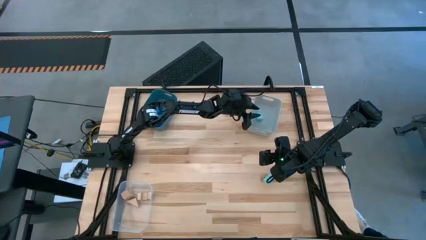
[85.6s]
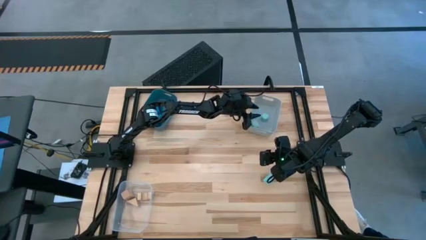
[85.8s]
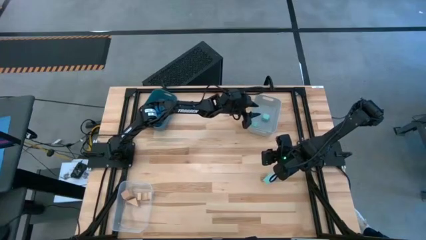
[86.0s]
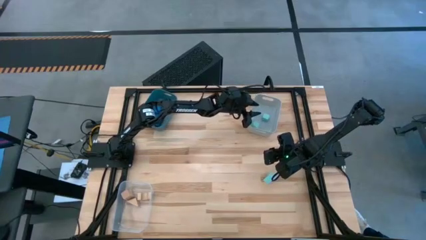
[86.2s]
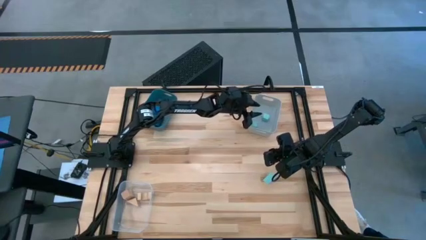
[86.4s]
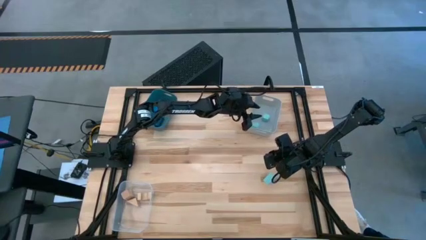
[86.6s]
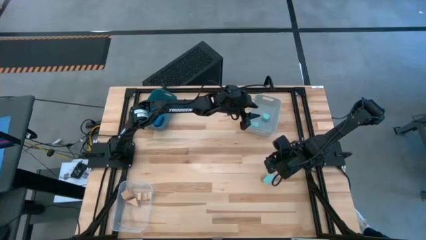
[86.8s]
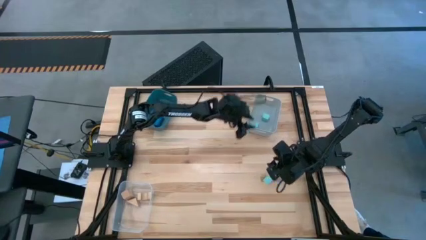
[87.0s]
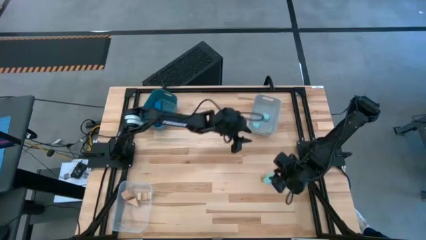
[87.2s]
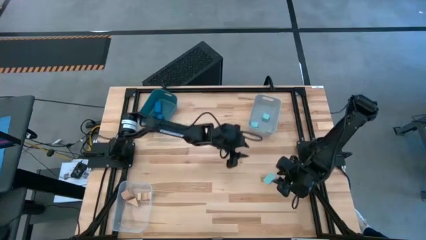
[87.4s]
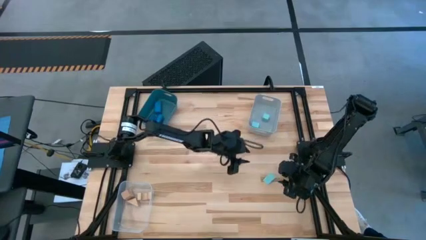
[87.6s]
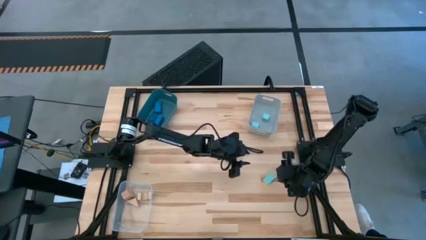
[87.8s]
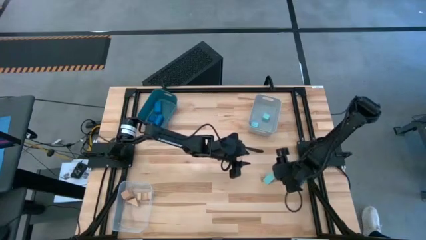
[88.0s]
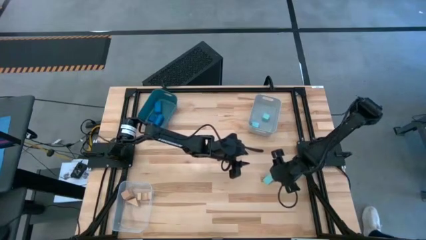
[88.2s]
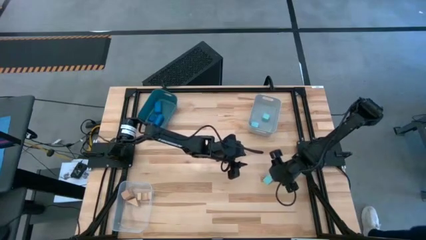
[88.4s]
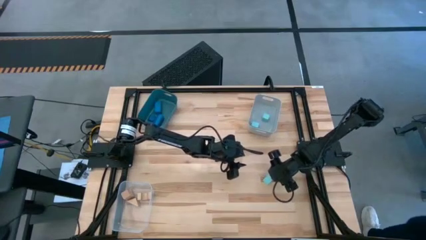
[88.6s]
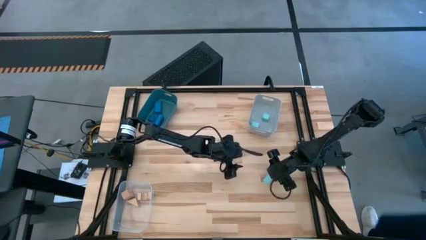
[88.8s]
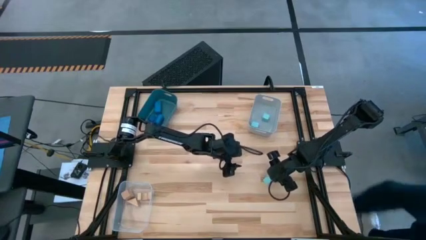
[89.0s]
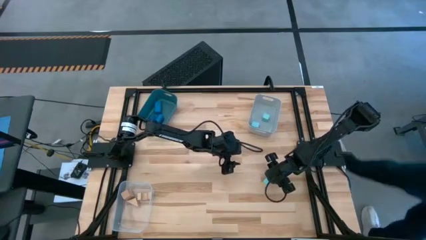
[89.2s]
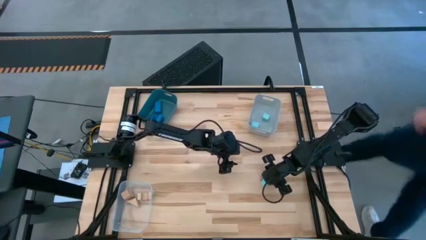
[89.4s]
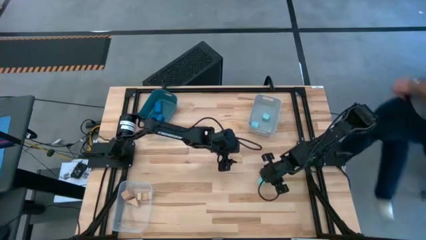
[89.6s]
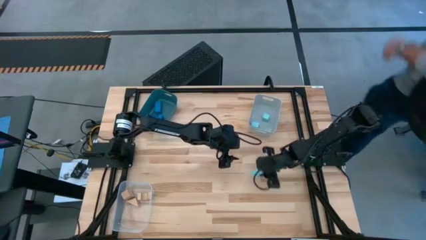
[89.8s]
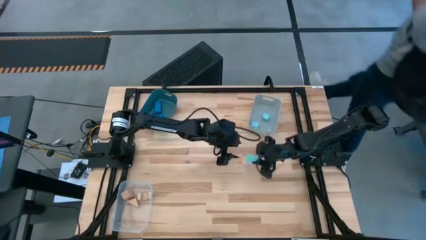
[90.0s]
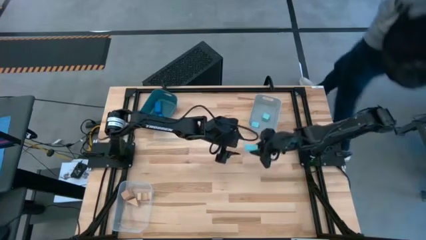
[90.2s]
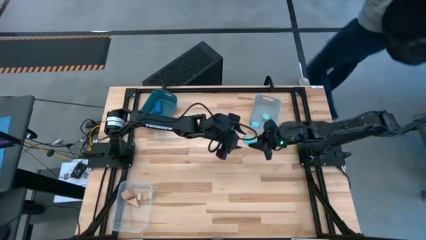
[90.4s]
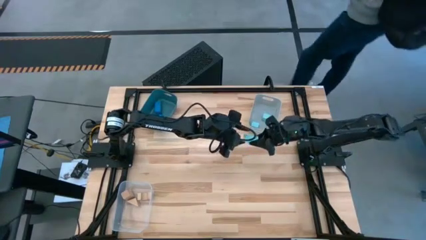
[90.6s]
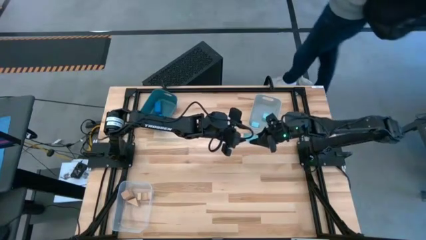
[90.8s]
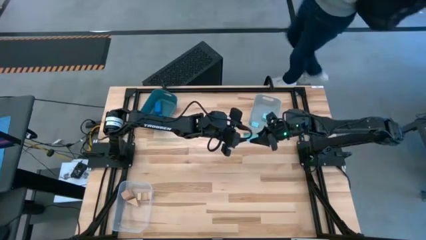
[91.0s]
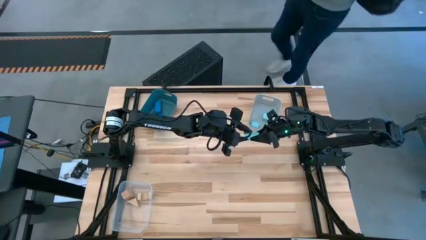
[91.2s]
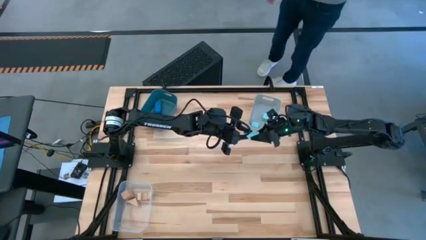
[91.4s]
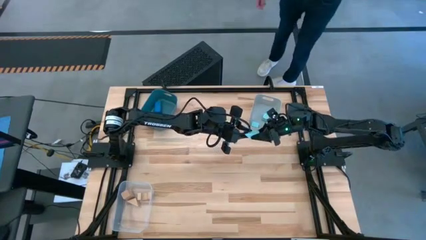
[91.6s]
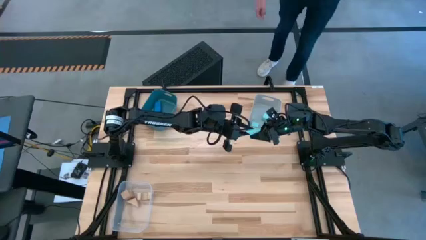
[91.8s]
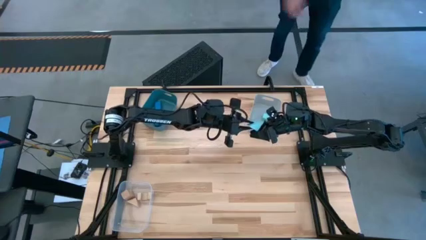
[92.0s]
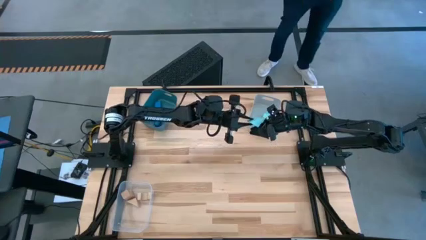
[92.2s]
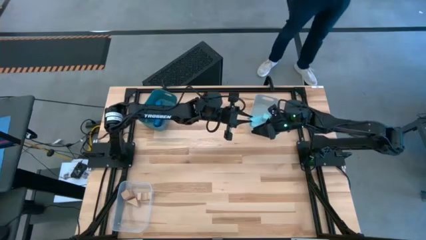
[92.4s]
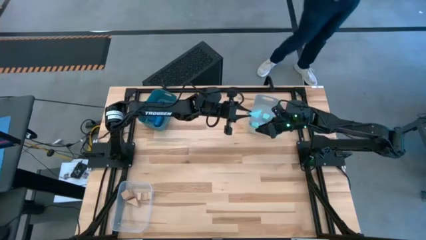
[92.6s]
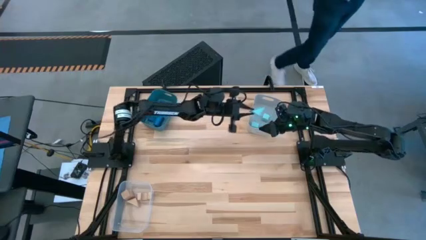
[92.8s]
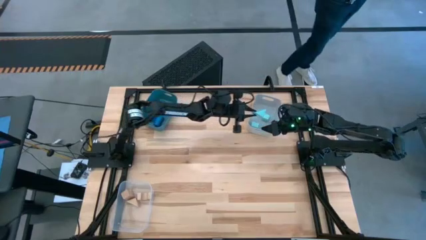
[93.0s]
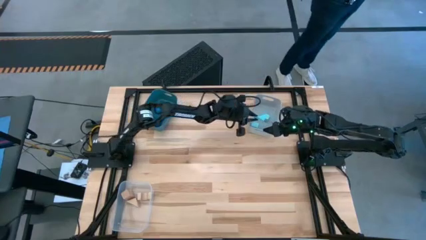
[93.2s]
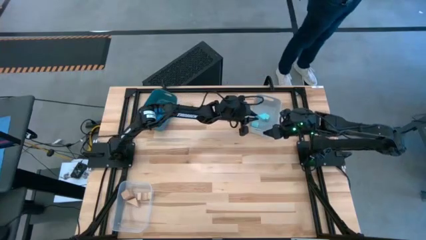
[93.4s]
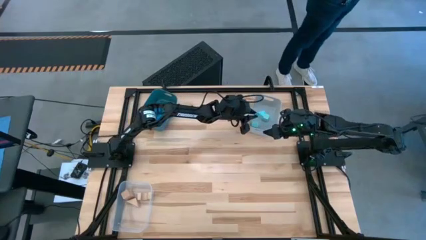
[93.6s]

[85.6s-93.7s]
Task: Sort & place blocks by color
Put the light blue block into the gray bin

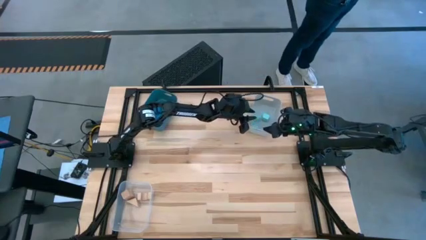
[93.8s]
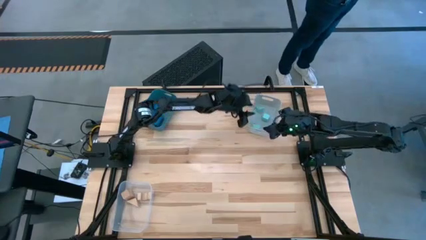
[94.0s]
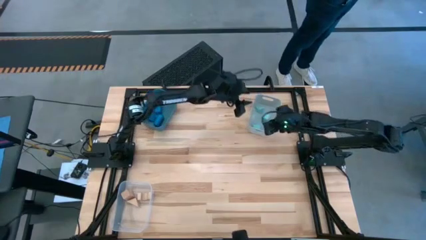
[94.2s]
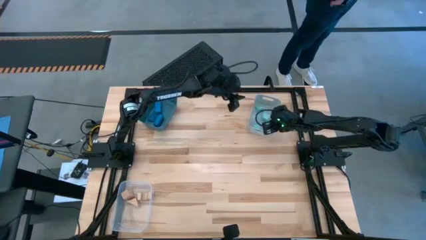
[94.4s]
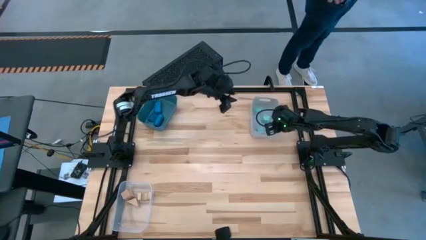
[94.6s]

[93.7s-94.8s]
Adjust the gray bin on the table

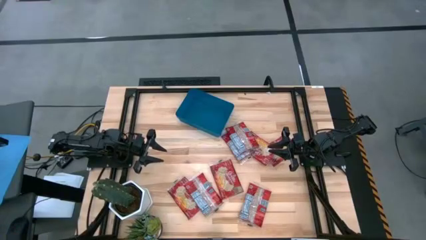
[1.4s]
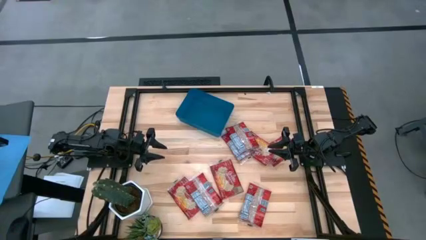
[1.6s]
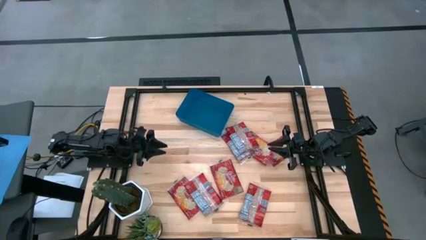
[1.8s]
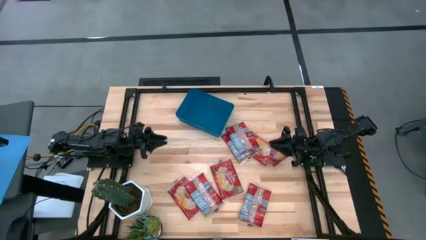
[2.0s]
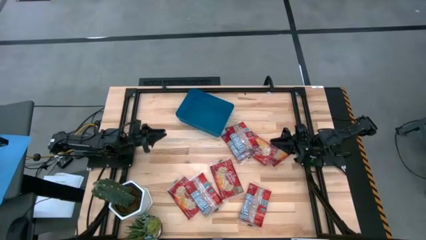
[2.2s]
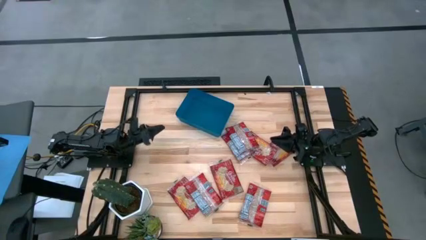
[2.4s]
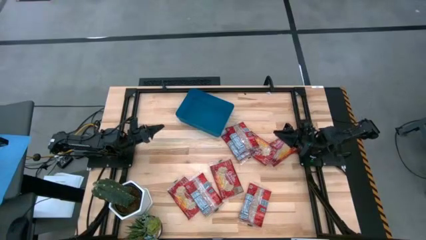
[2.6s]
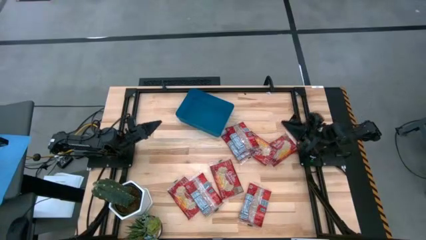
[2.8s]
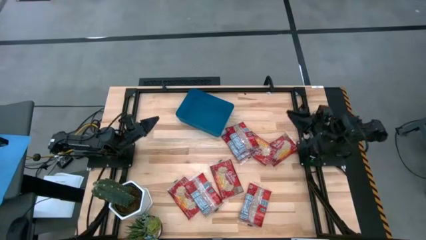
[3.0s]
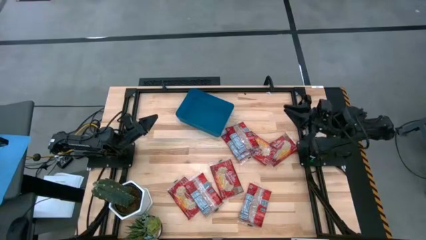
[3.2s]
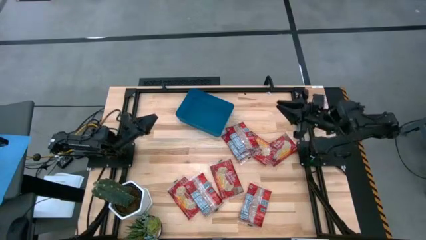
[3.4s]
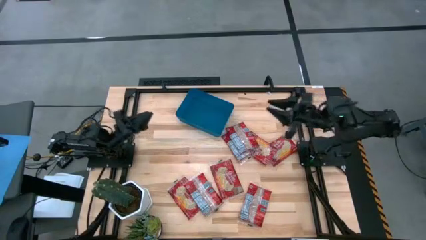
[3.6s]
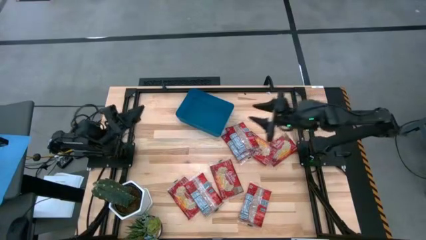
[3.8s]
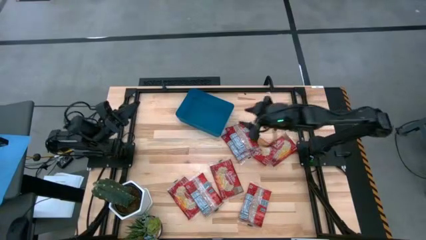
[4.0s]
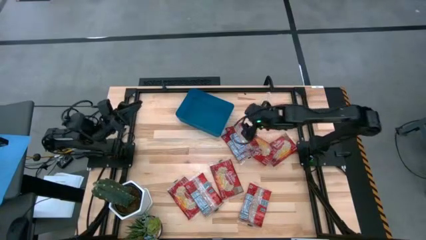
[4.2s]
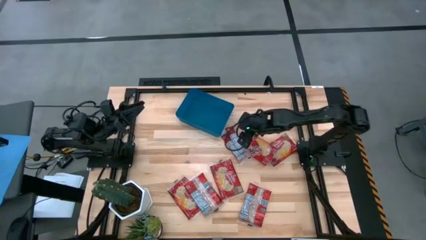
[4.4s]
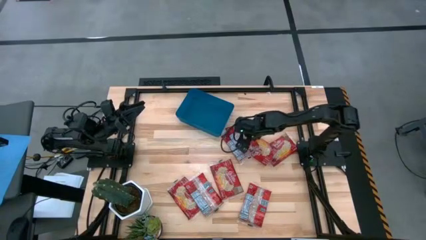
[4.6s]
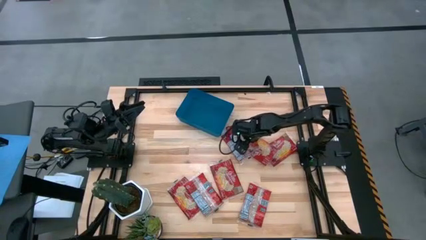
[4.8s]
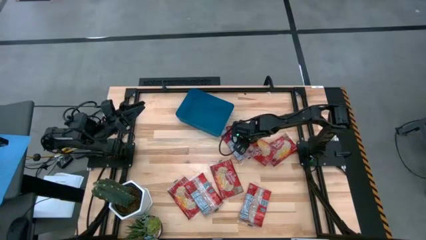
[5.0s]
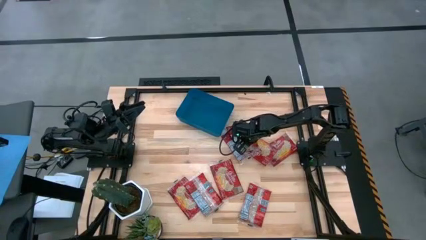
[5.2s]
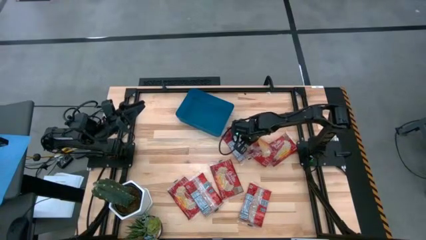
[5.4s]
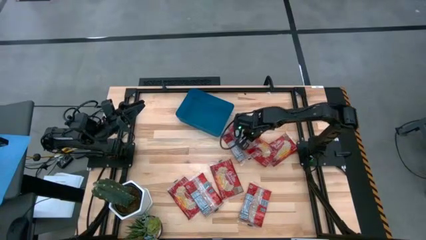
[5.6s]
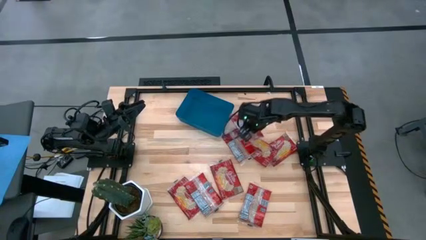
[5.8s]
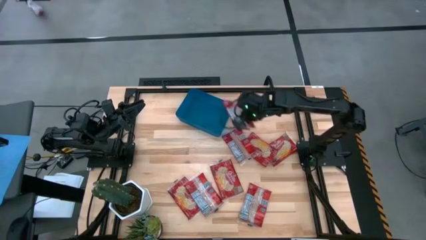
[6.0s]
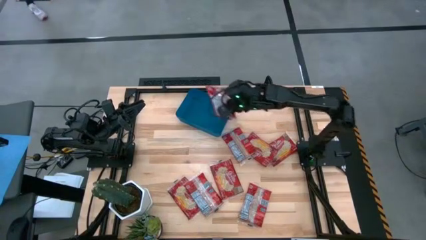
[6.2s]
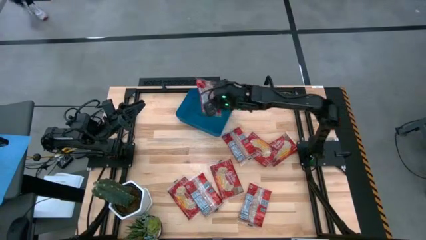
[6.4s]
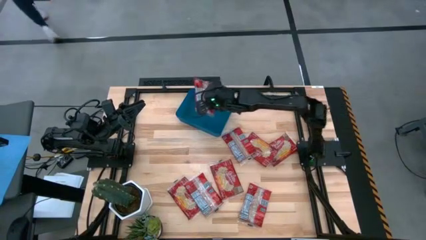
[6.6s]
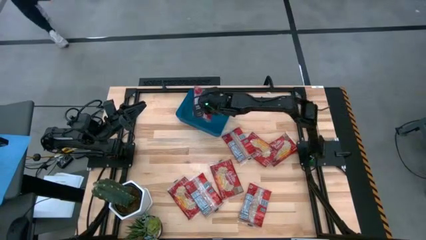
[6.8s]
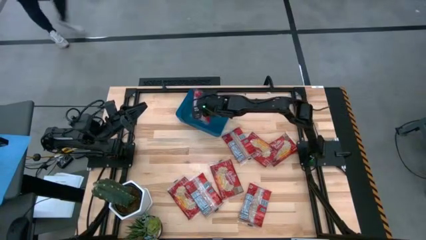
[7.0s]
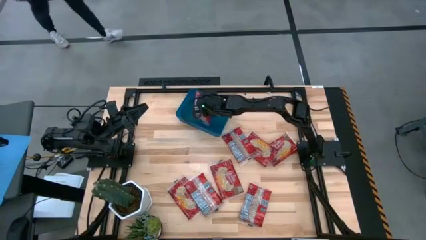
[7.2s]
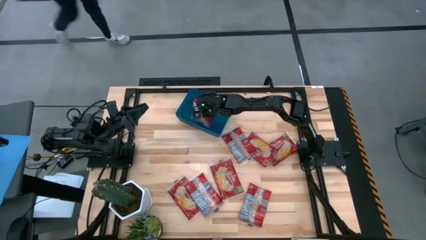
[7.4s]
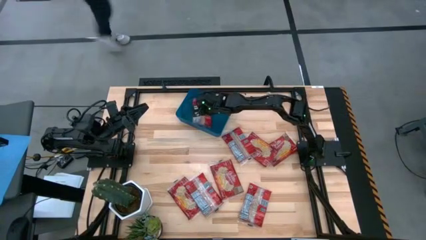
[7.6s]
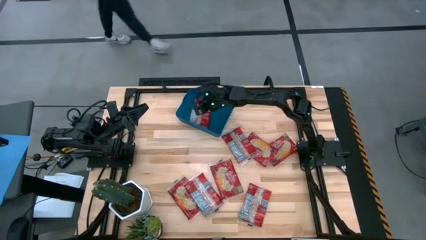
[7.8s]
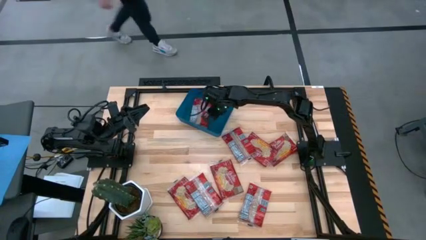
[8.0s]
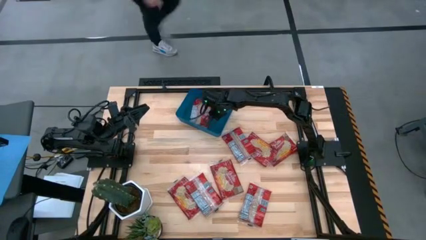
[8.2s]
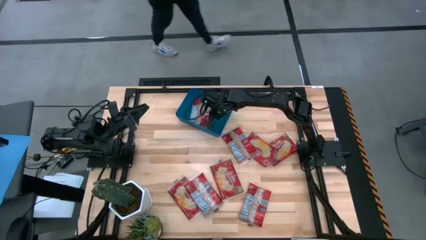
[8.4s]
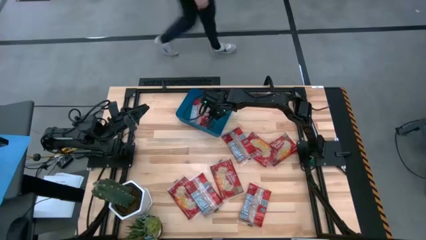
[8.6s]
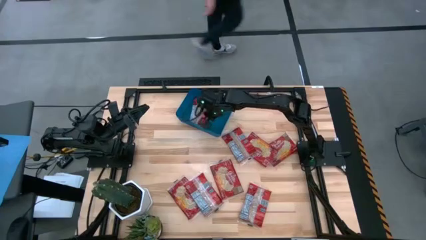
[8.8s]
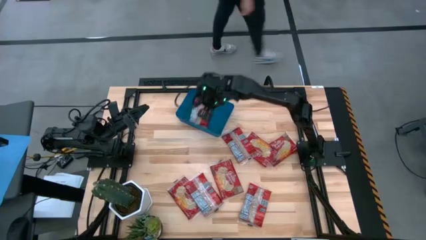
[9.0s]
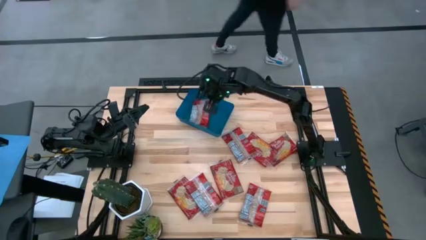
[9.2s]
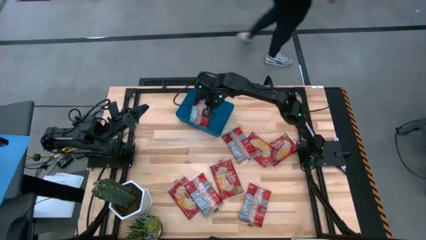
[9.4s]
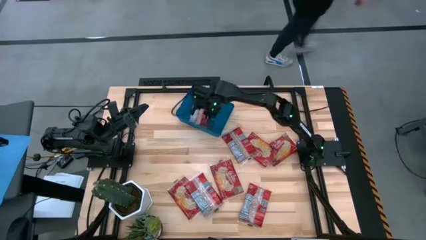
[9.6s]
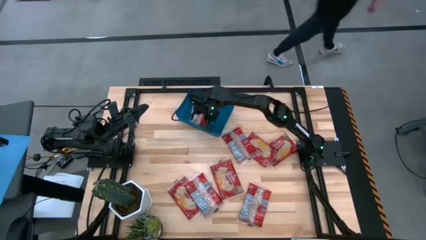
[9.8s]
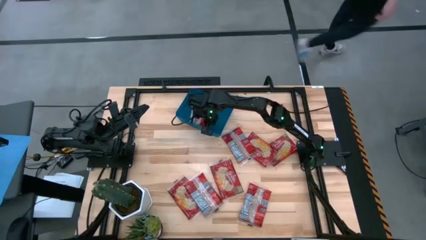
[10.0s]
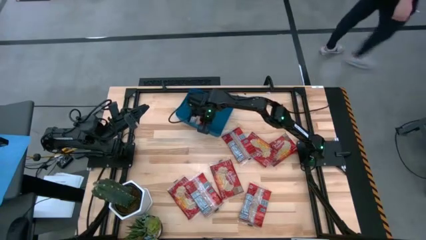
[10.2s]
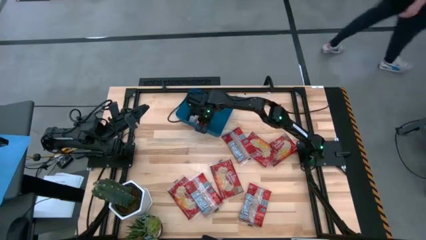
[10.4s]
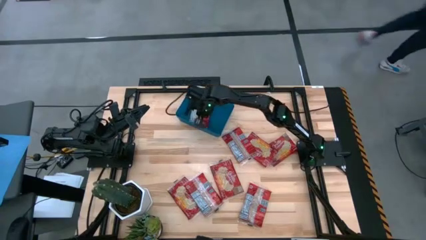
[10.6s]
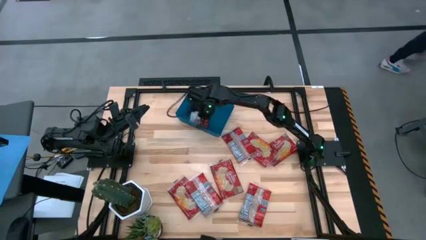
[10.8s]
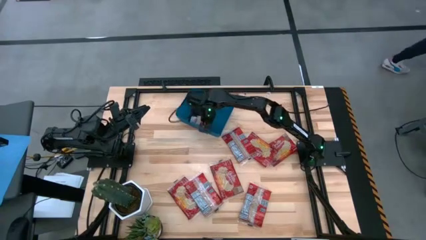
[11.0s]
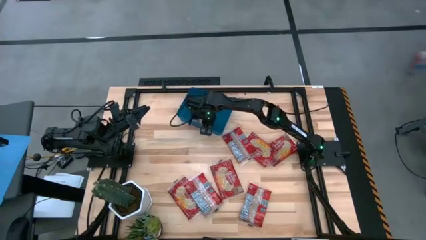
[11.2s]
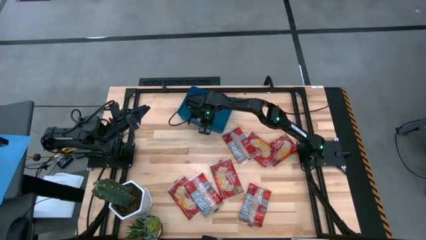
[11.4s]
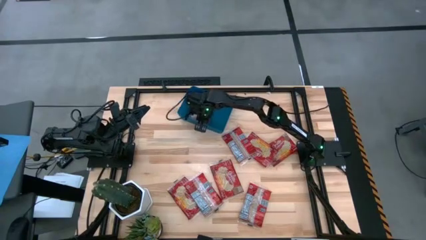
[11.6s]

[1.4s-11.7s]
Task: Sort popcorn bags into baskets
Put the red popcorn bag into the blue bin
